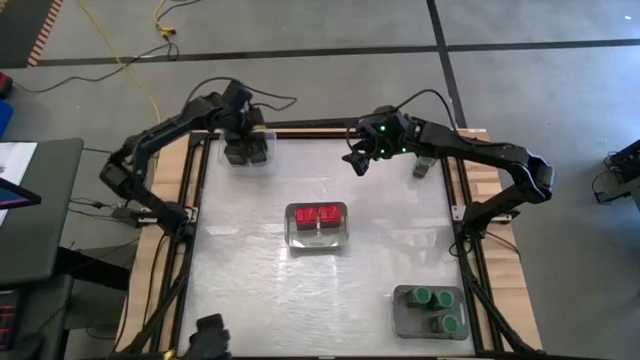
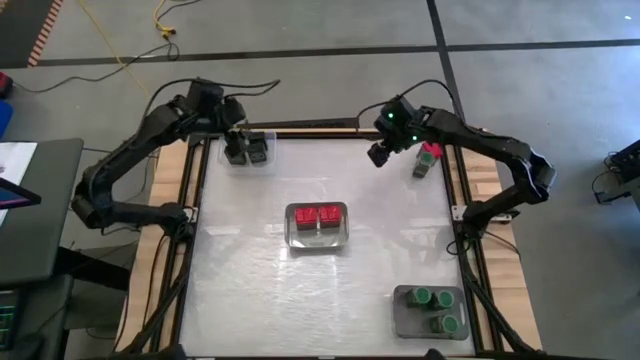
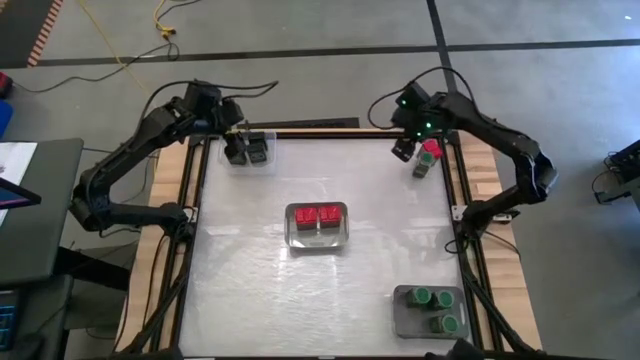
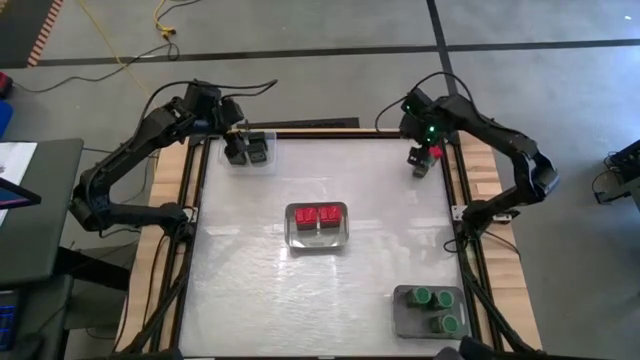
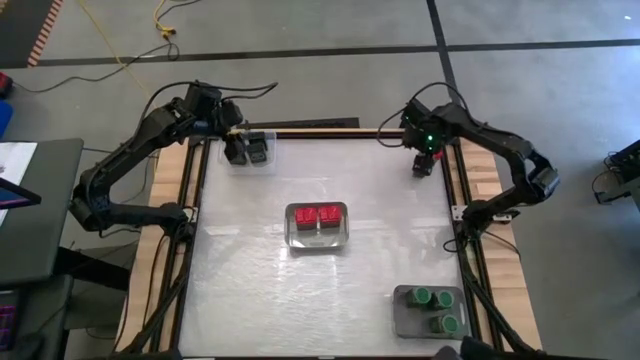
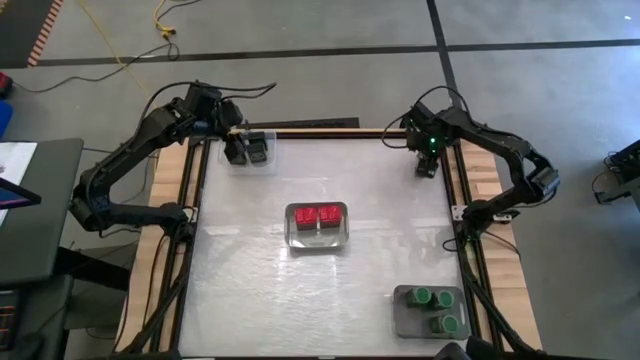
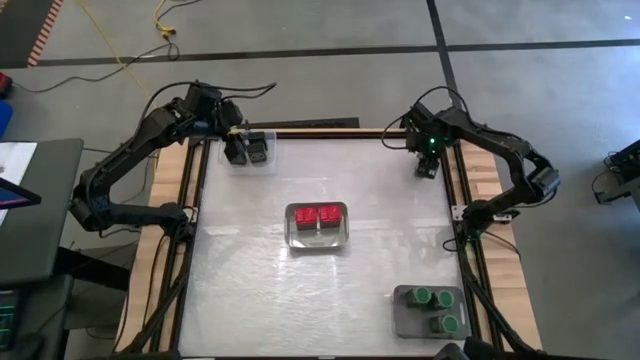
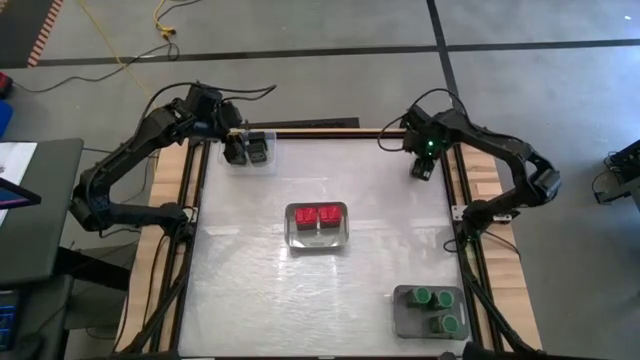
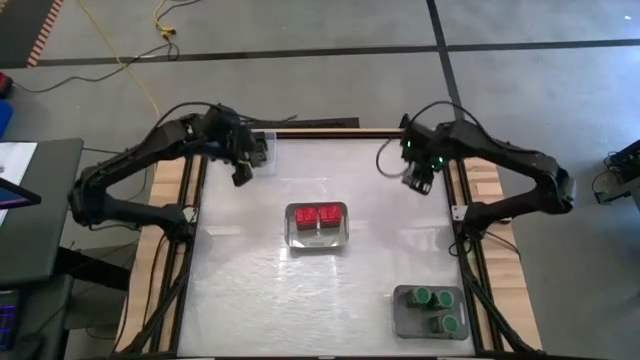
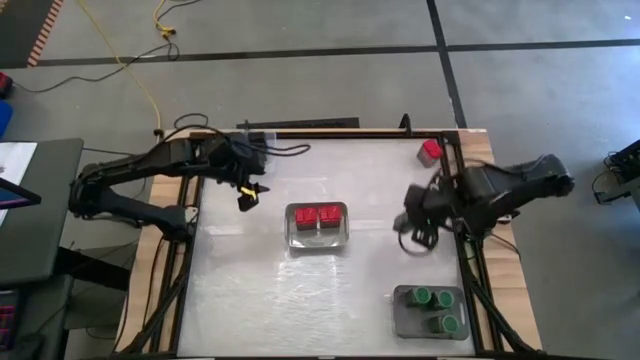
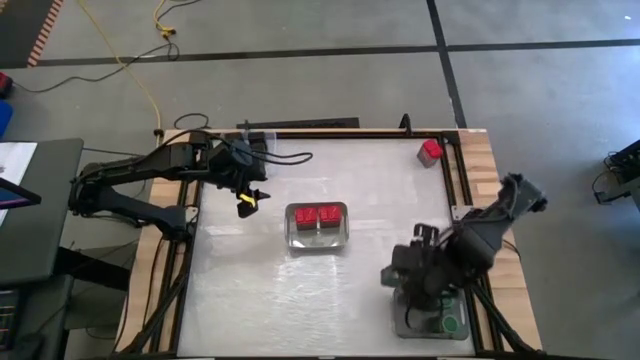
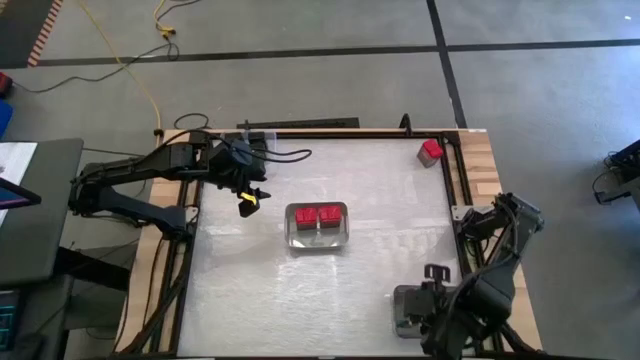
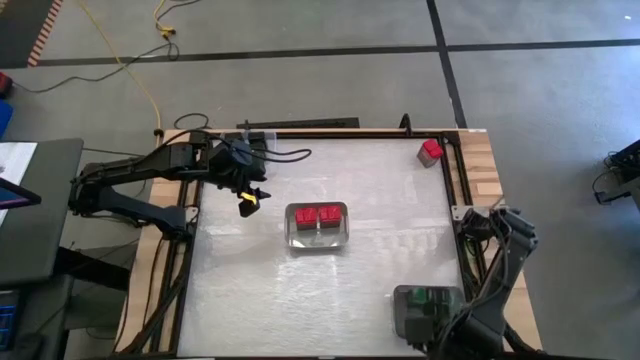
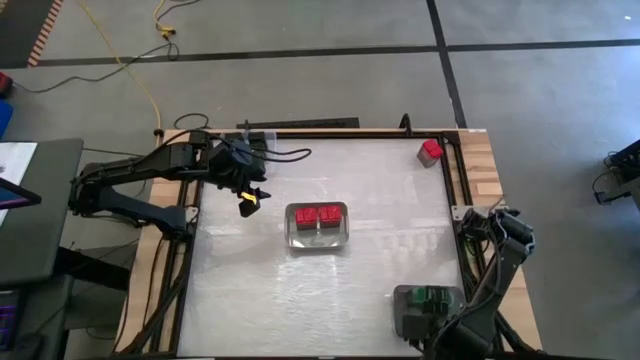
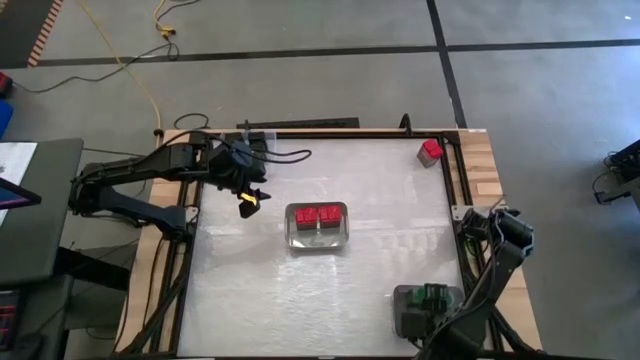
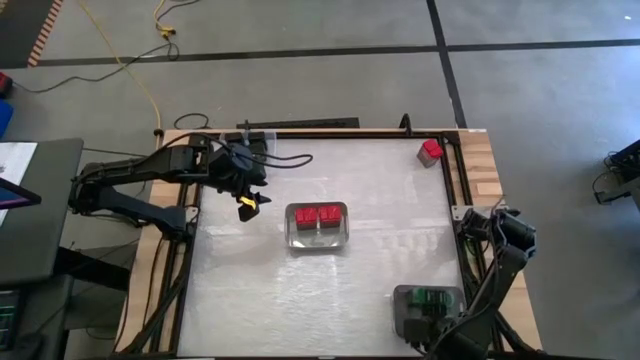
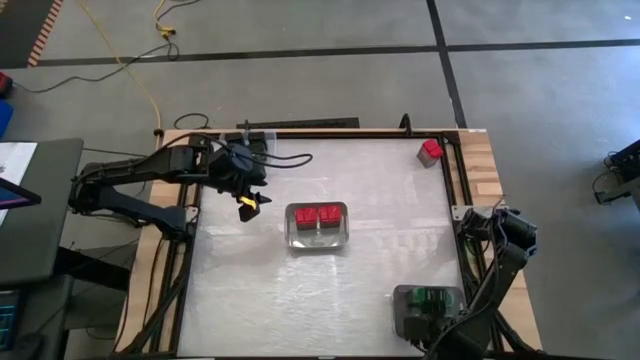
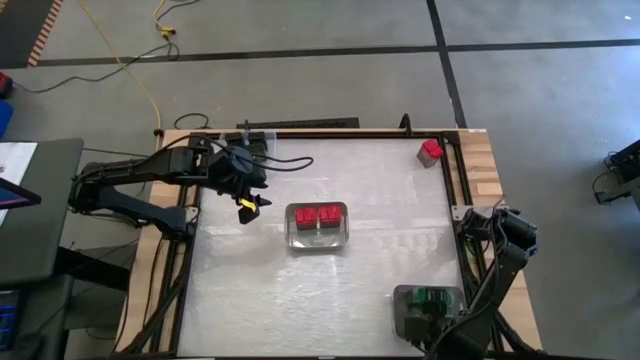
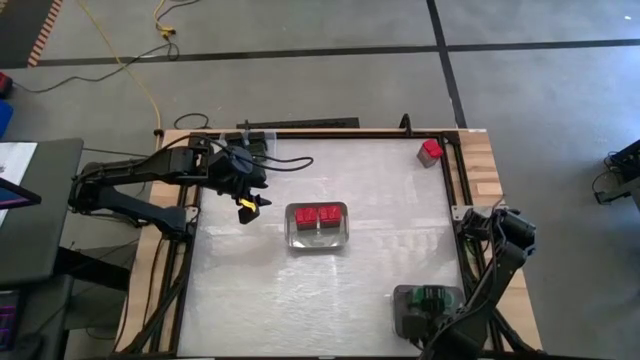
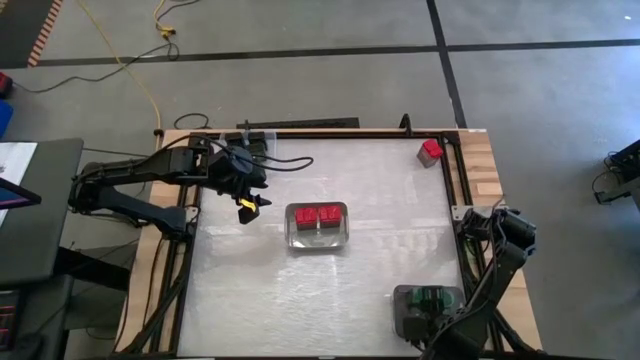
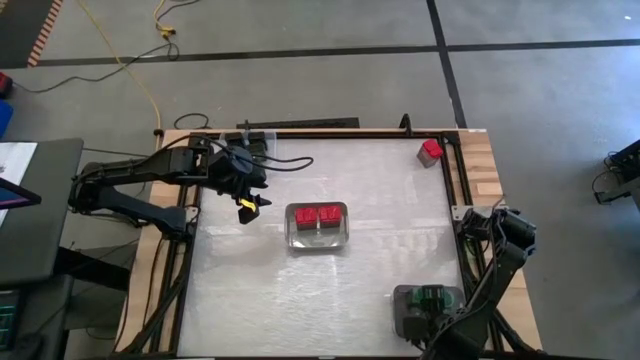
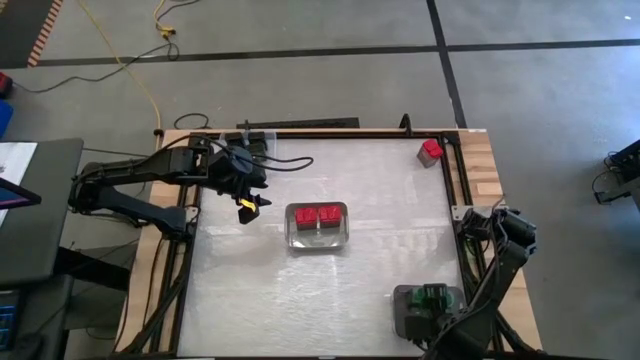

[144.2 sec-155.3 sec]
Task: Sort spices by type
Put the green seasoning bottle into the black bin

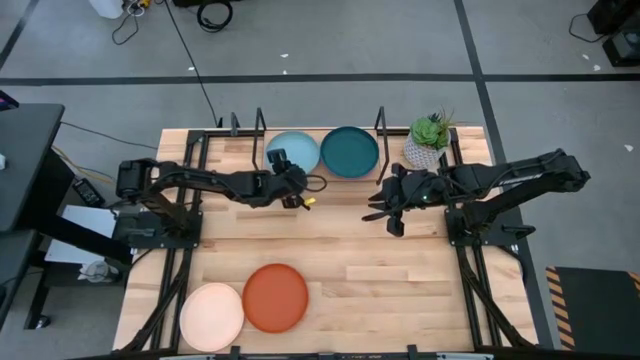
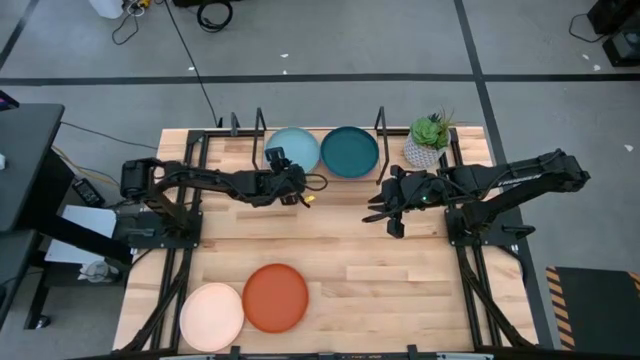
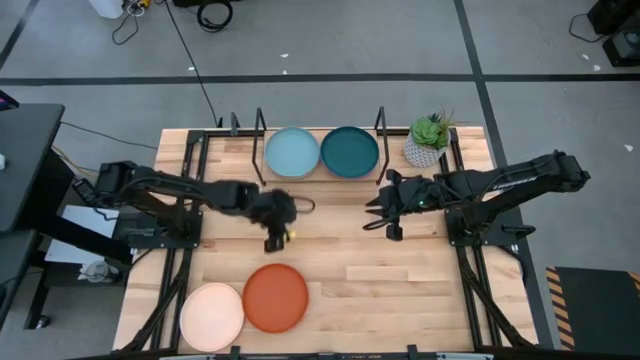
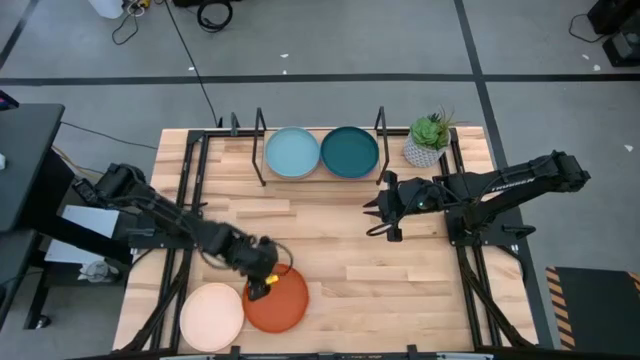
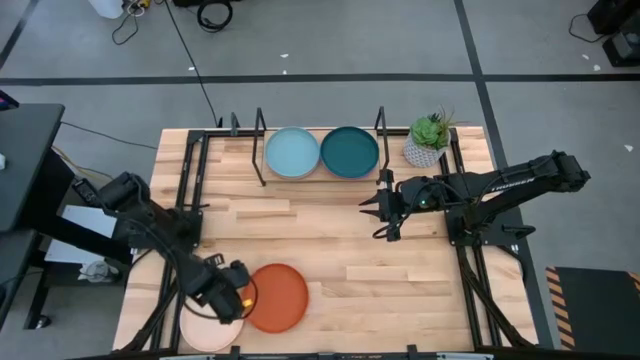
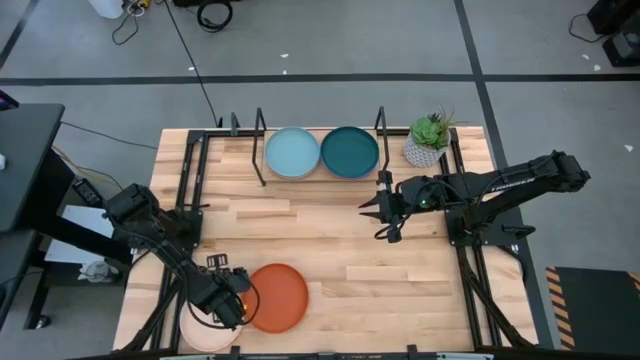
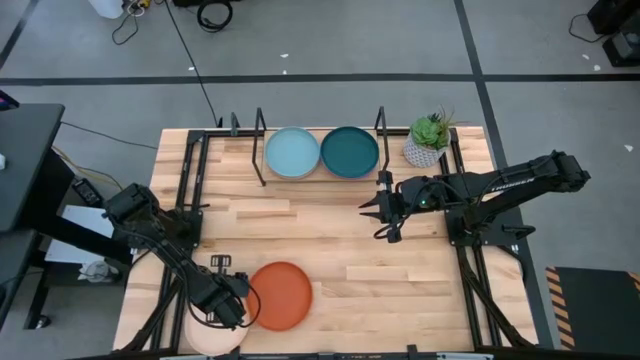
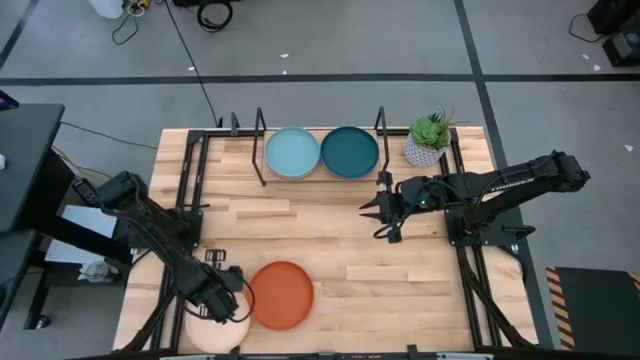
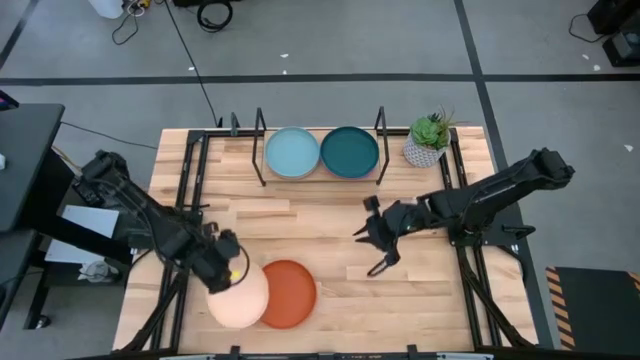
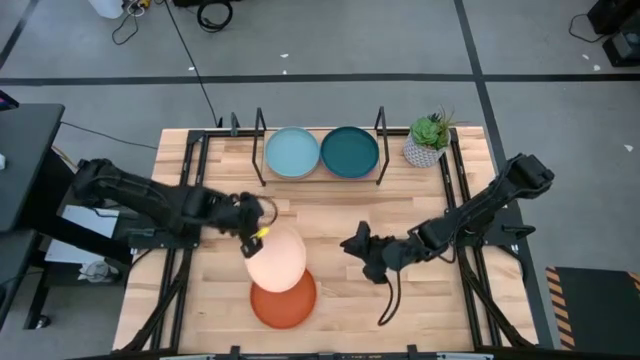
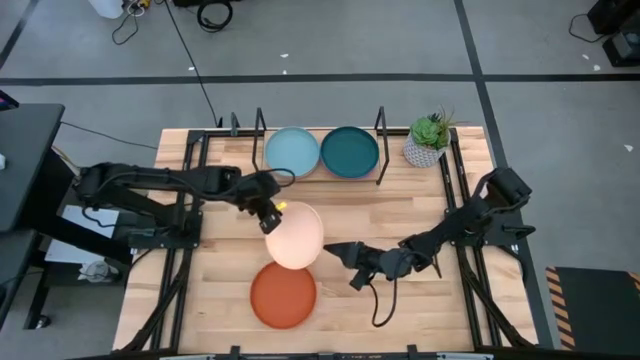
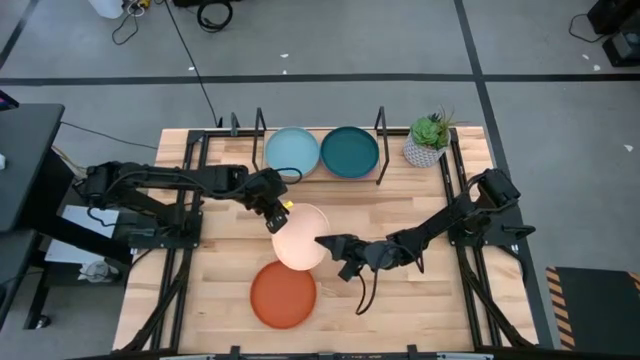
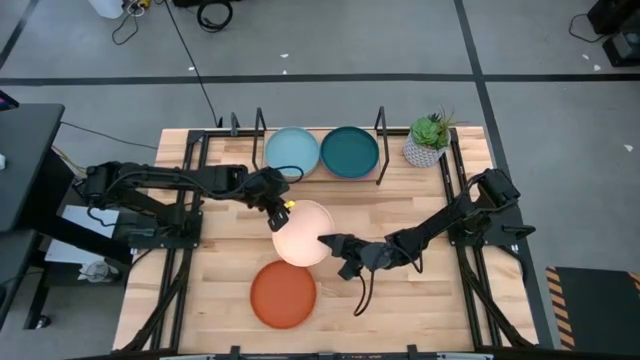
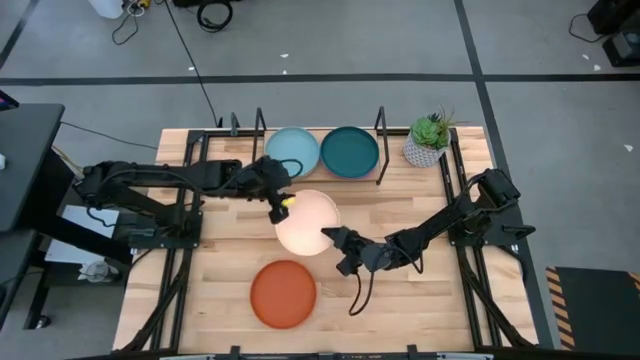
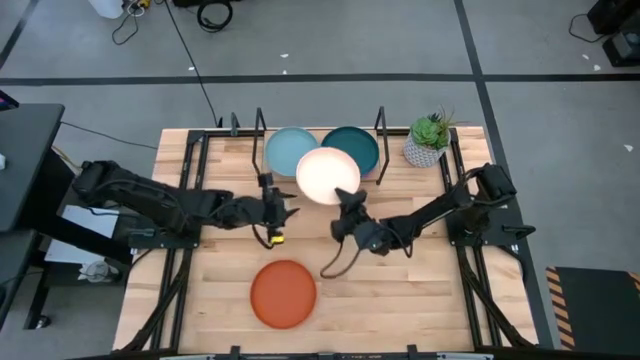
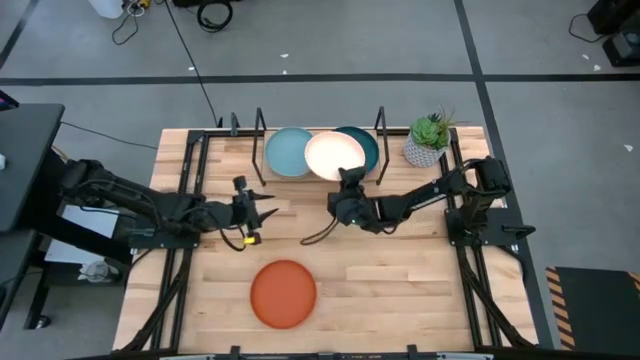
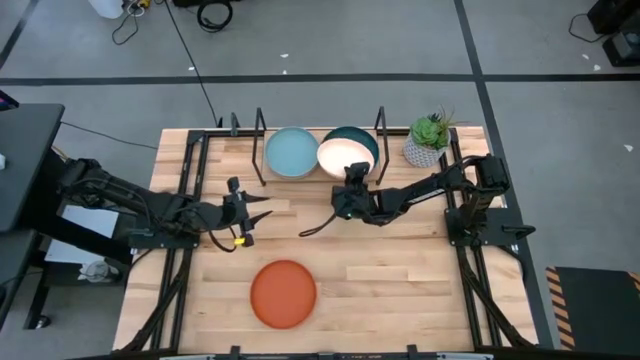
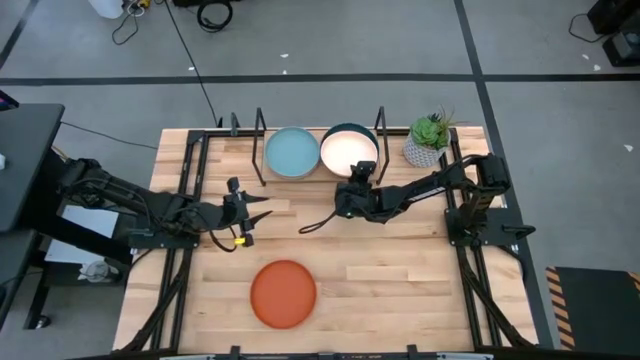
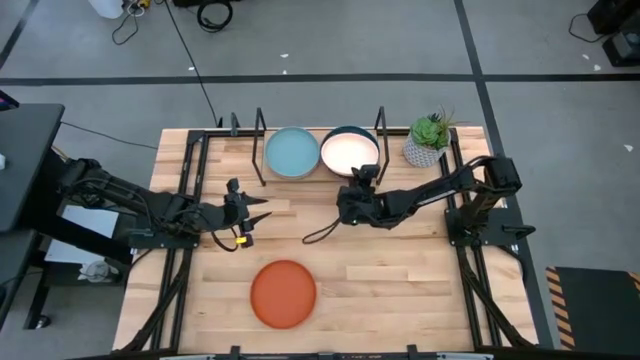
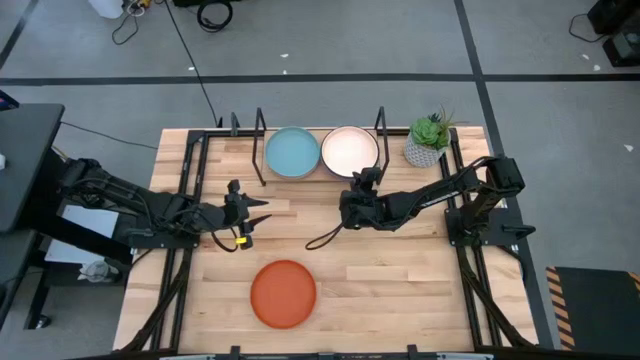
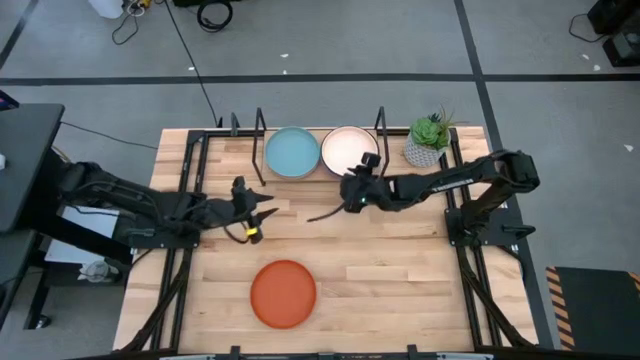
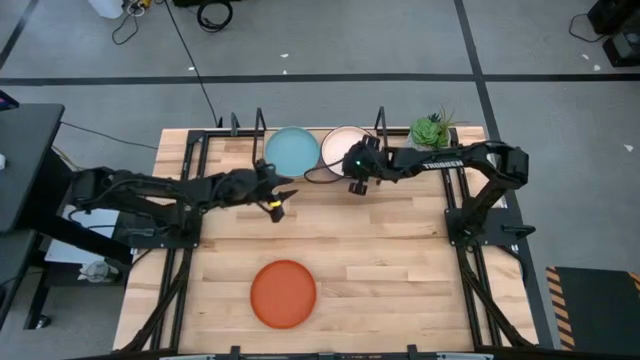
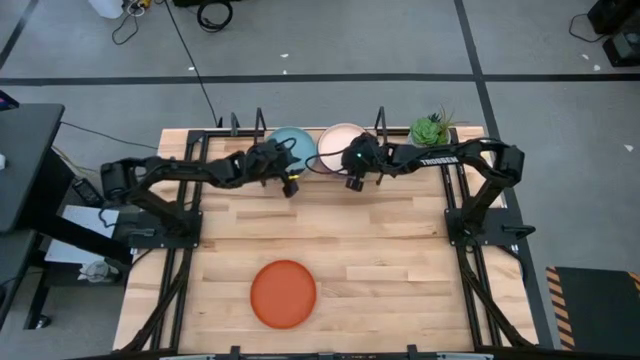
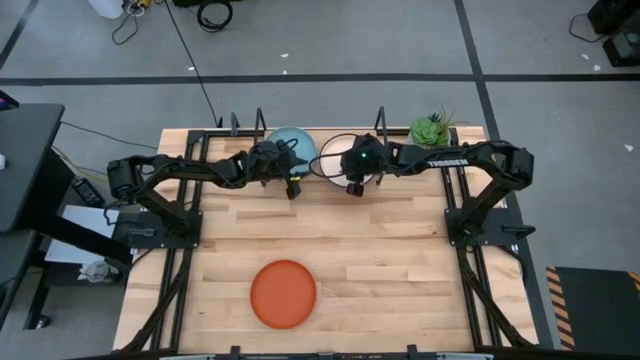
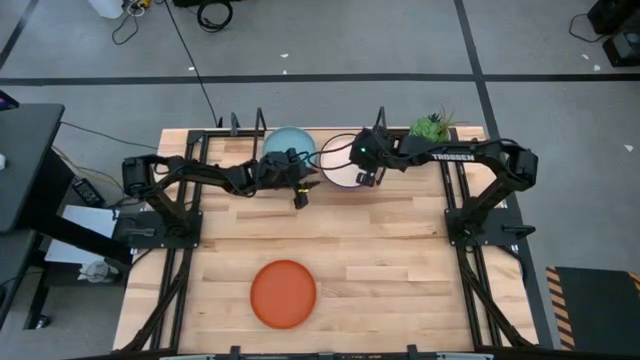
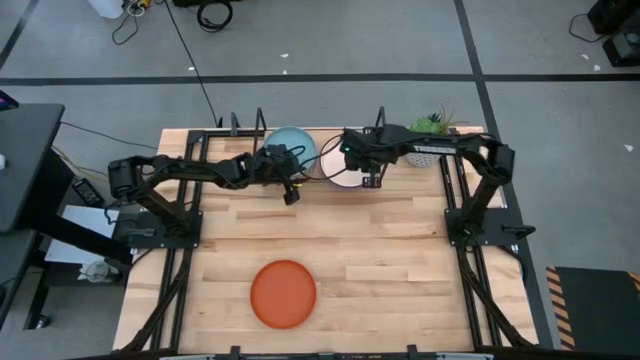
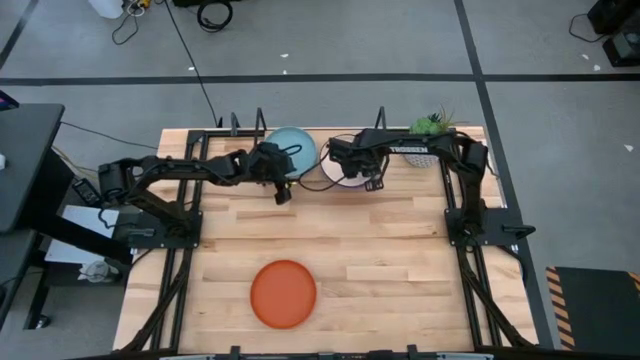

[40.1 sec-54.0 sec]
Task: Place and stack plates onto a shelf
Stack the light brown plate on top of the dark green plate on the shelf
